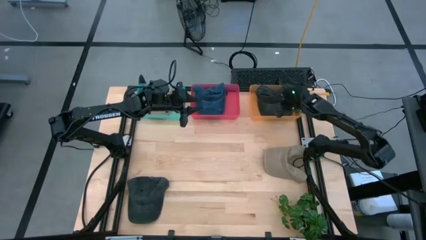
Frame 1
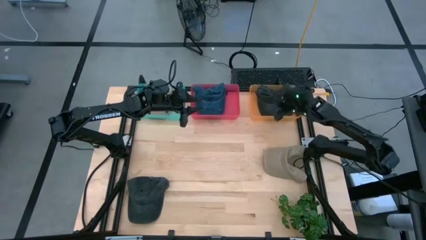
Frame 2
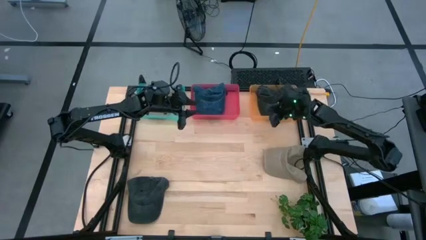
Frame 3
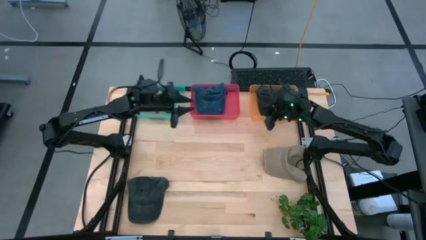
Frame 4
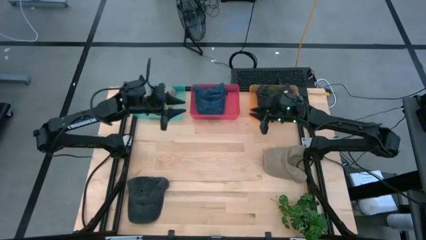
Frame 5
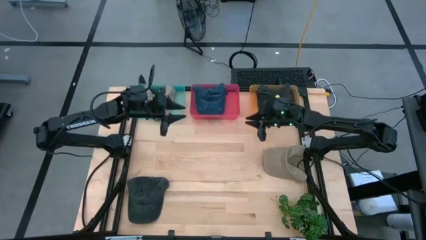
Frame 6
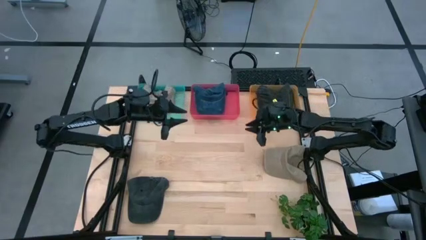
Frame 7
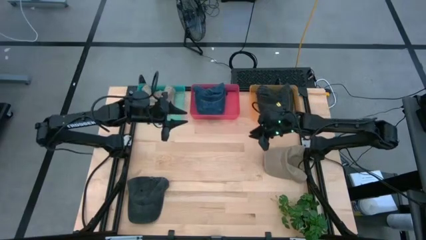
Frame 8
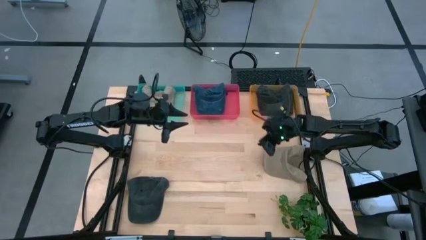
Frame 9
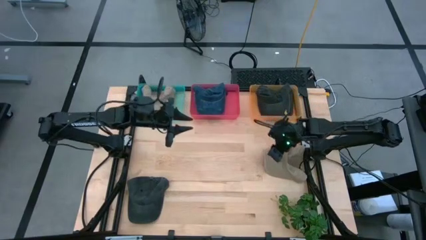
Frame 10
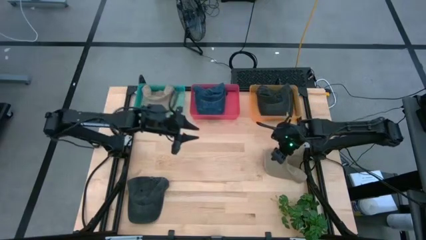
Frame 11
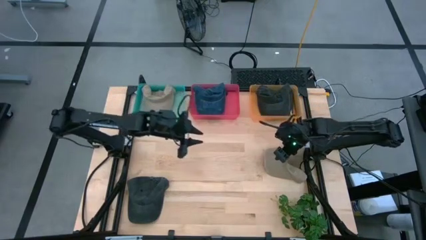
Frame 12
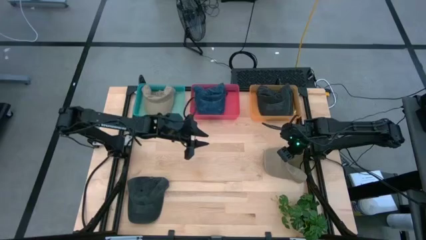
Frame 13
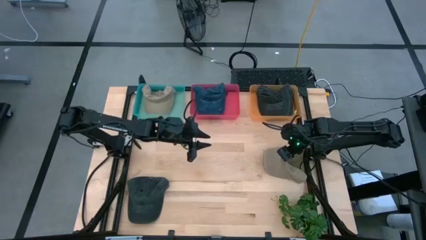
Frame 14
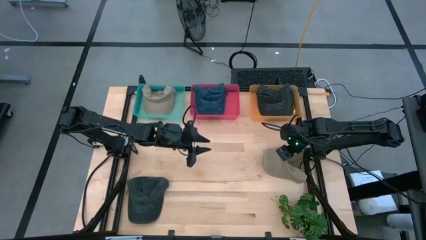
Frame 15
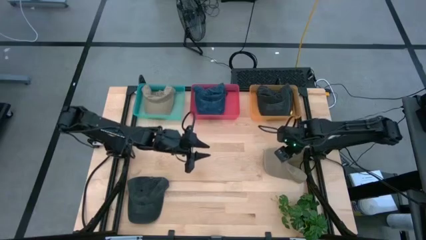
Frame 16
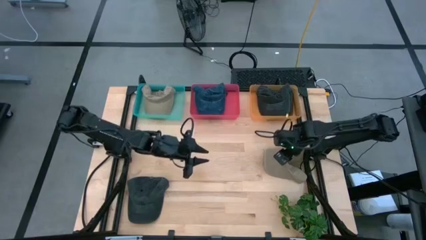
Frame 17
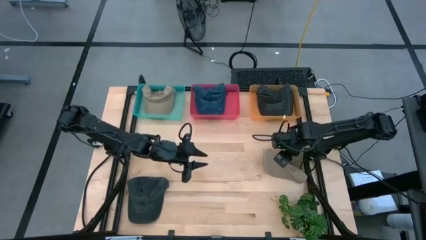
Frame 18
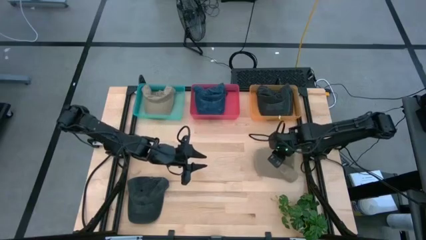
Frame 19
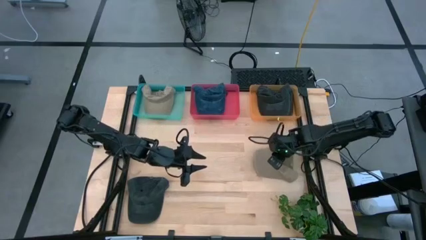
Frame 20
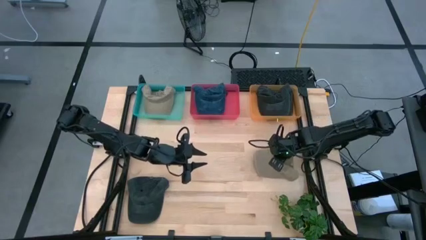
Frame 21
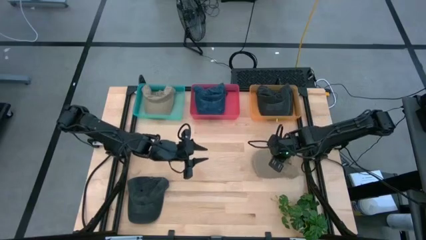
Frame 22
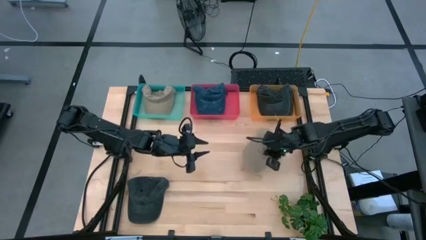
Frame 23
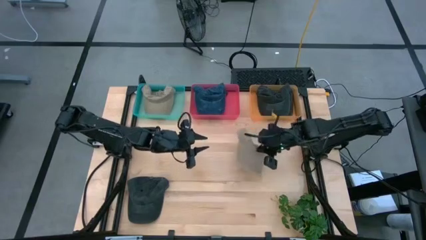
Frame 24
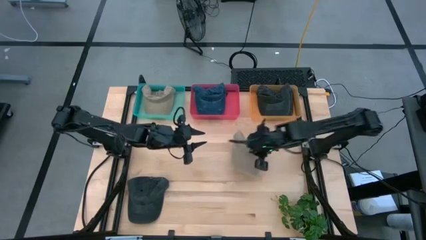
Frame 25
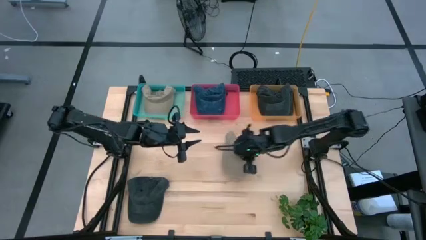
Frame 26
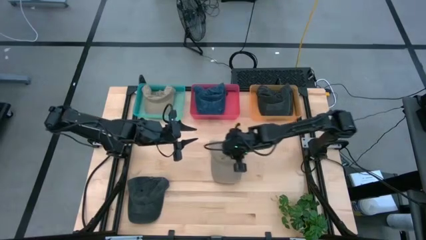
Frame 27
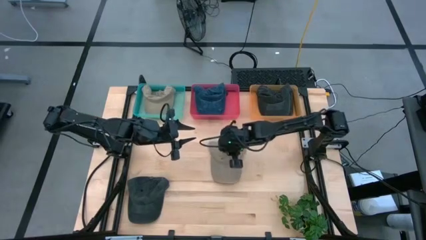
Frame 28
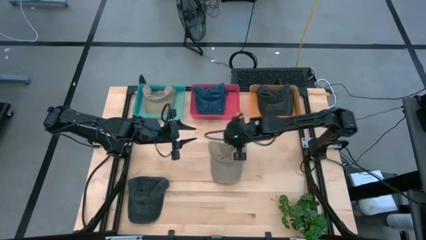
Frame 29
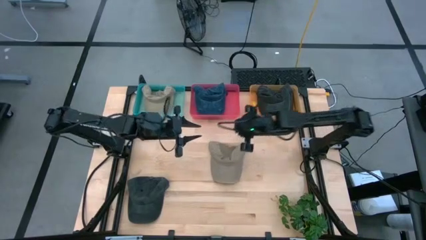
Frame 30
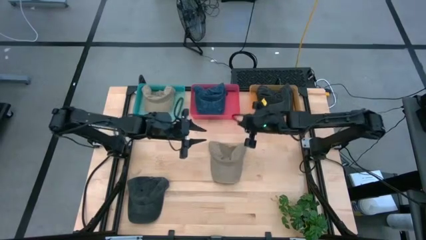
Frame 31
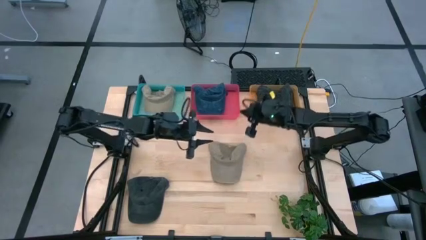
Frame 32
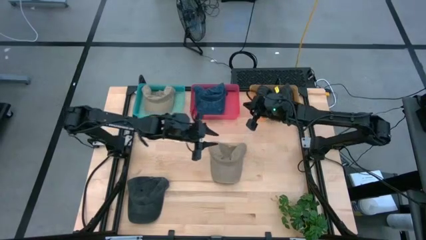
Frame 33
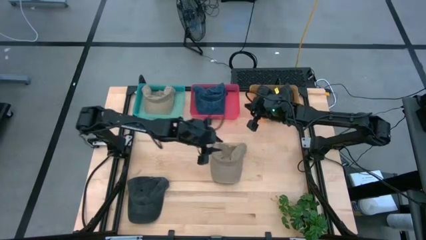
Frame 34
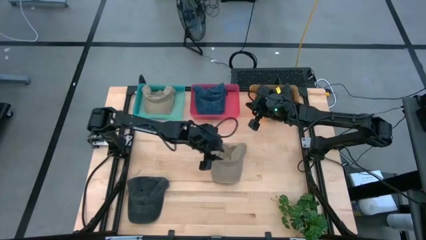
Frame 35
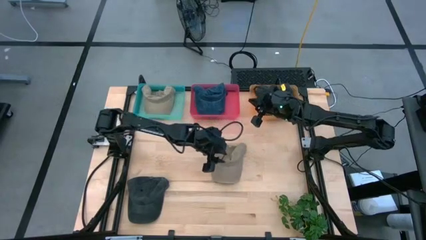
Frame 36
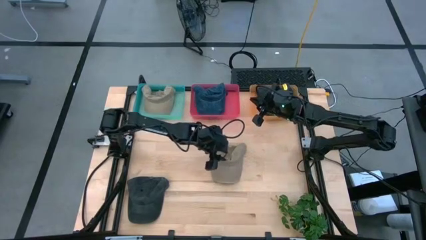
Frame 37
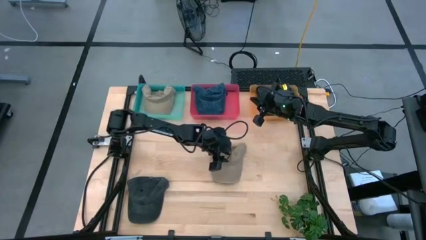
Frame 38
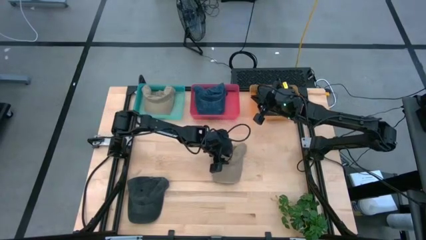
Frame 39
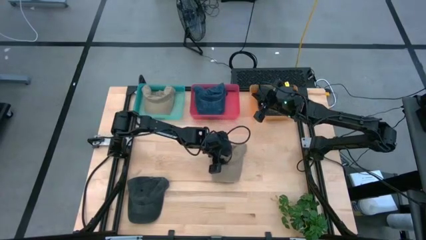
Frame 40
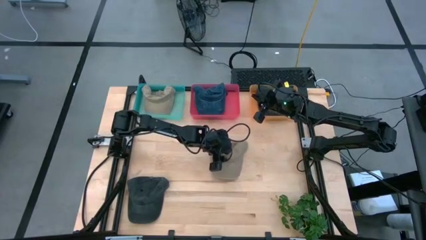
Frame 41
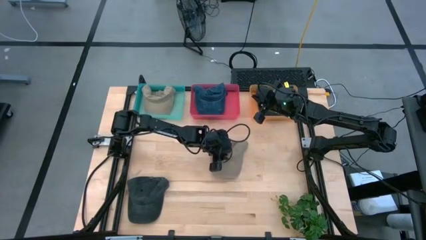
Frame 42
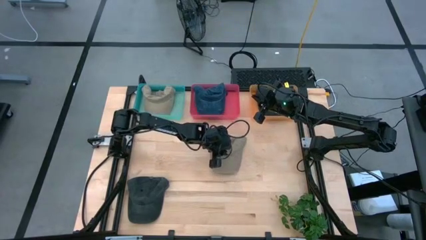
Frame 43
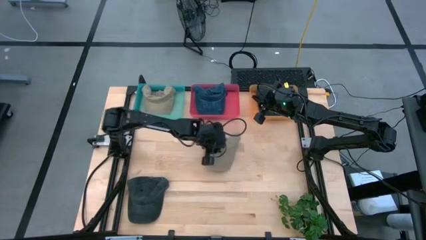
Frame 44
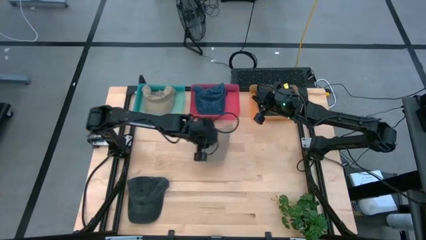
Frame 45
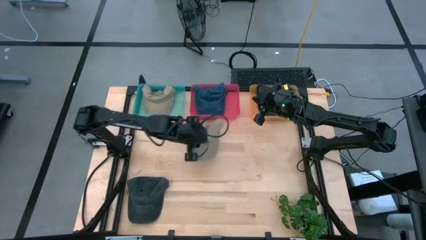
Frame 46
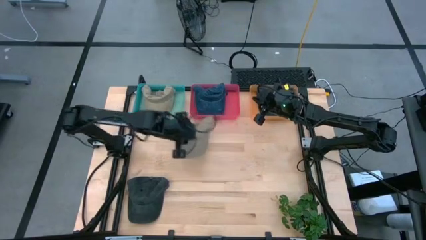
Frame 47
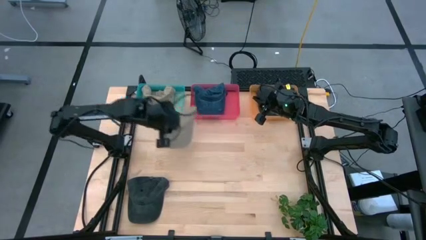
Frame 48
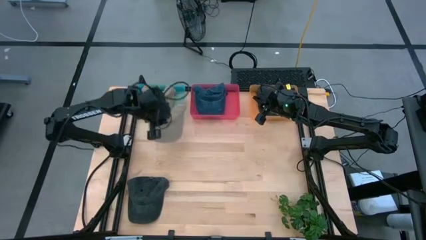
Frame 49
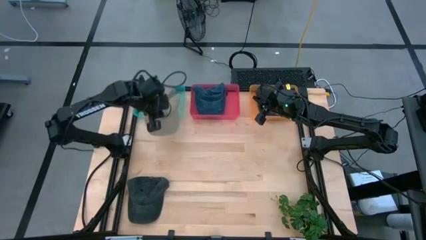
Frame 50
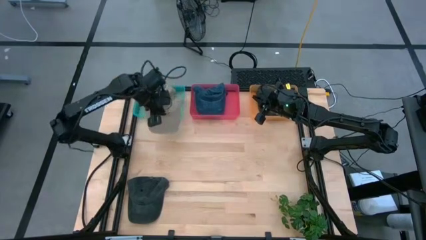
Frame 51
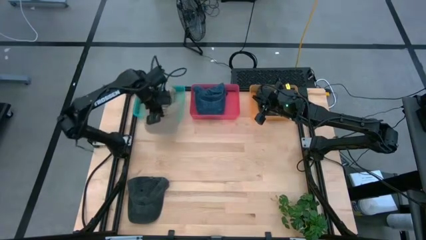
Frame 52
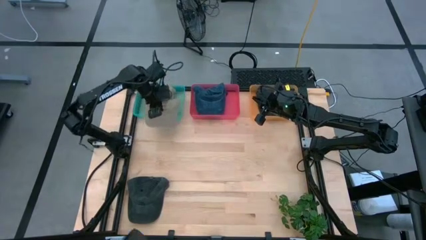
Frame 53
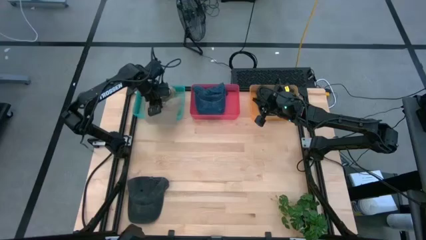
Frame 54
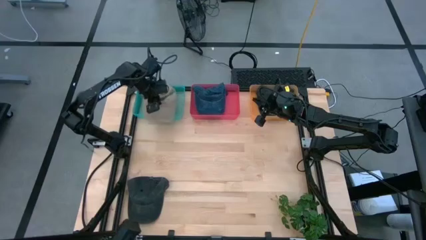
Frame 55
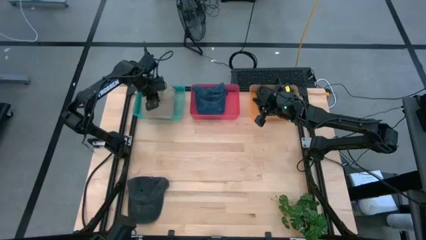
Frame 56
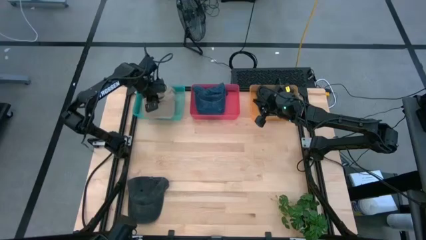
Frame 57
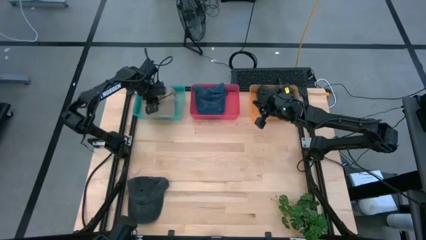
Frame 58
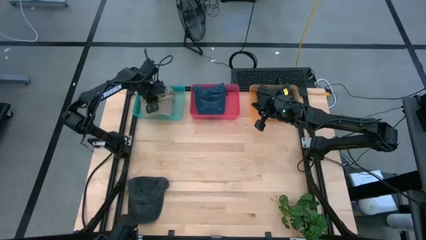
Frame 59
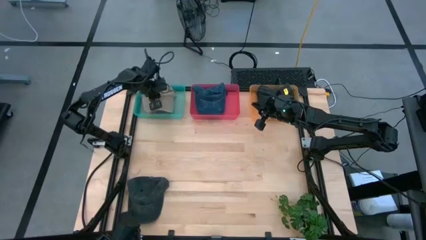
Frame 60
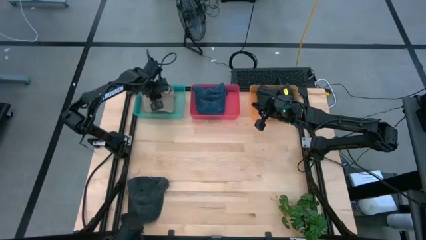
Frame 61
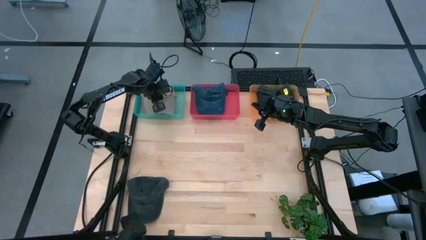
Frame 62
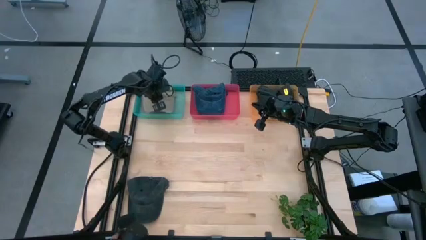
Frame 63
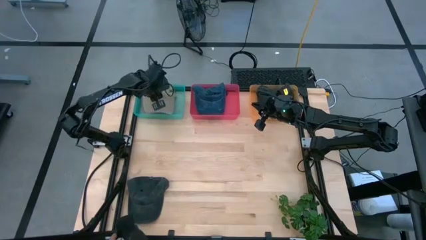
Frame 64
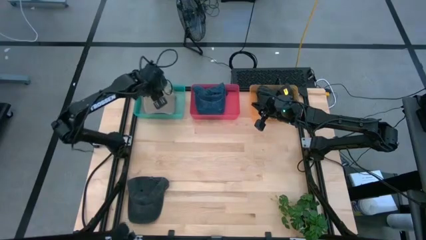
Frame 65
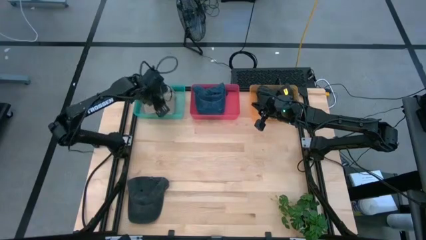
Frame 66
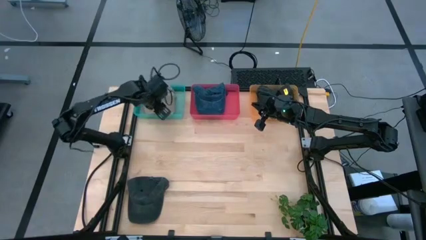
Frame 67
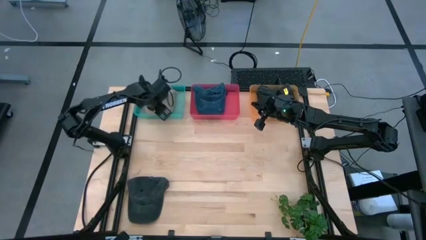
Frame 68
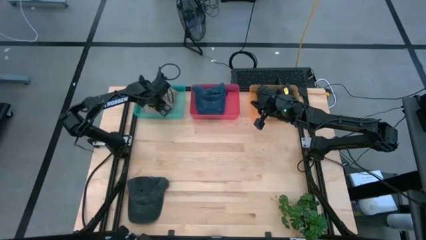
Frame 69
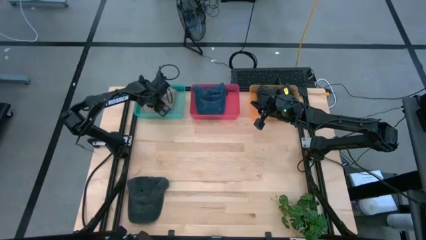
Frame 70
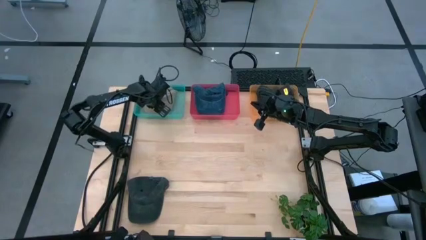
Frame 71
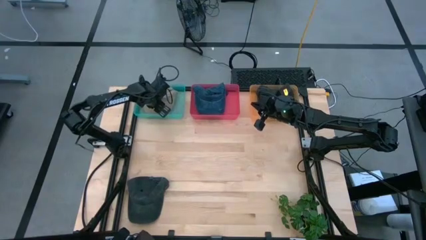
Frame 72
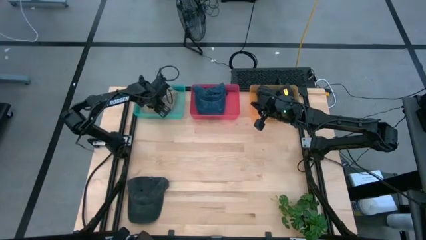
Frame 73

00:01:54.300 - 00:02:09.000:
Task: Pick & Place hat
Put the brown cap into the green bin
